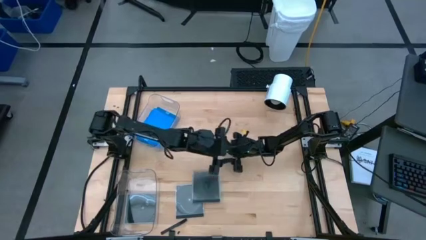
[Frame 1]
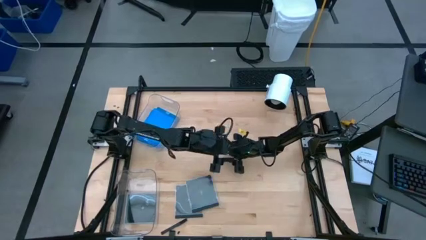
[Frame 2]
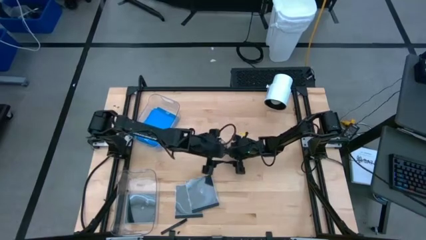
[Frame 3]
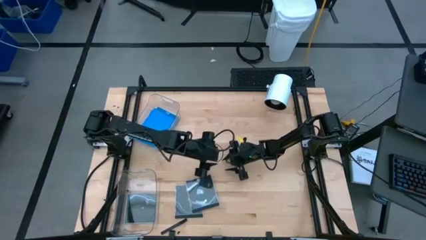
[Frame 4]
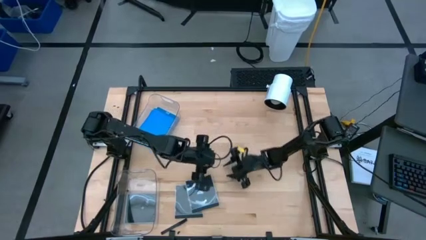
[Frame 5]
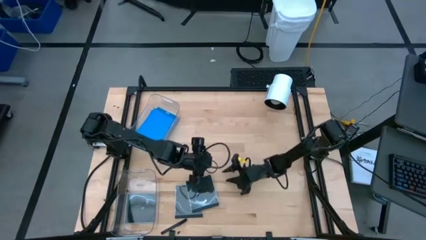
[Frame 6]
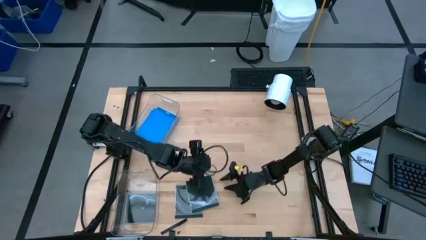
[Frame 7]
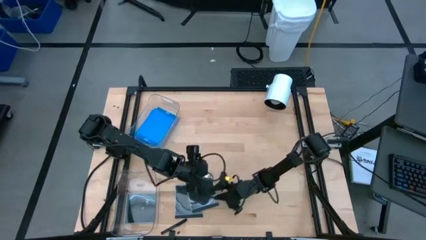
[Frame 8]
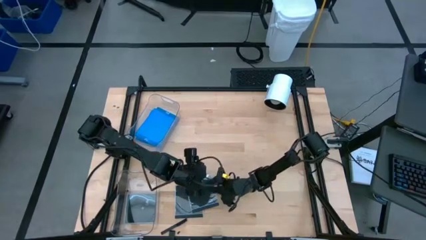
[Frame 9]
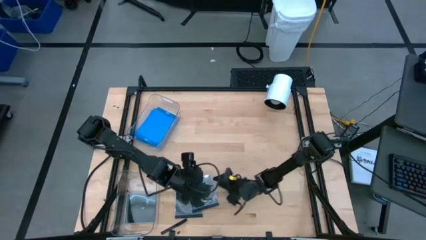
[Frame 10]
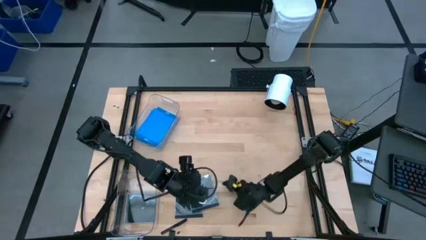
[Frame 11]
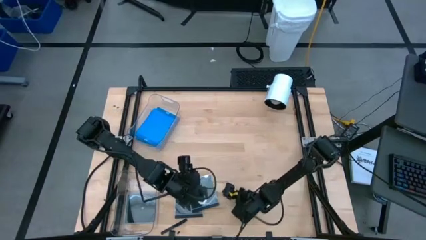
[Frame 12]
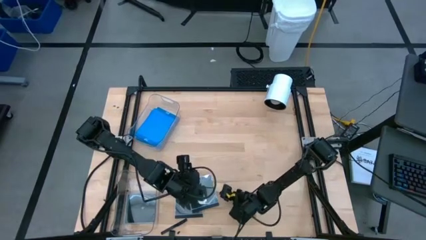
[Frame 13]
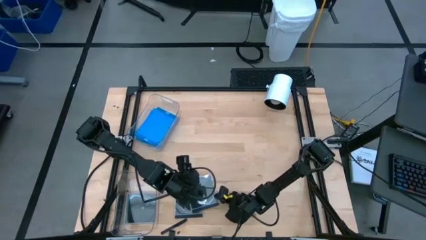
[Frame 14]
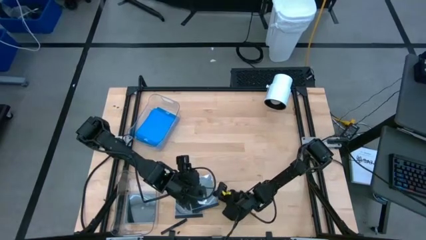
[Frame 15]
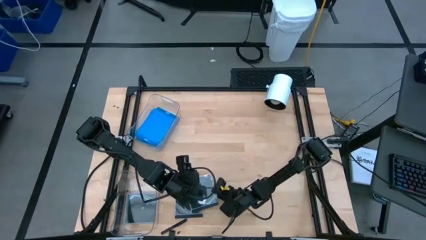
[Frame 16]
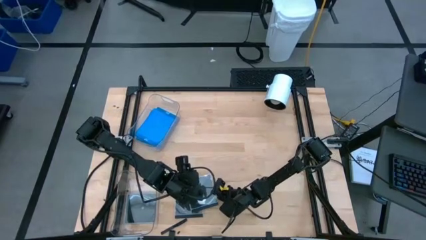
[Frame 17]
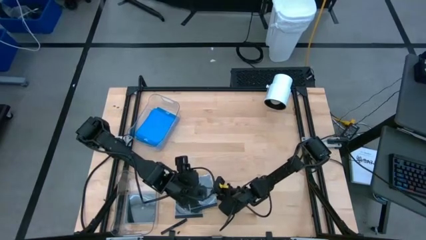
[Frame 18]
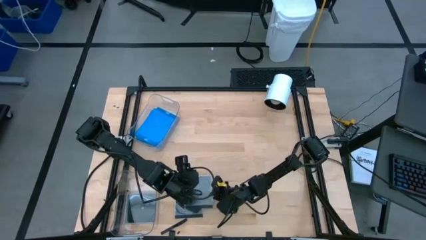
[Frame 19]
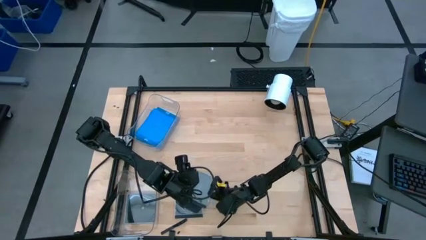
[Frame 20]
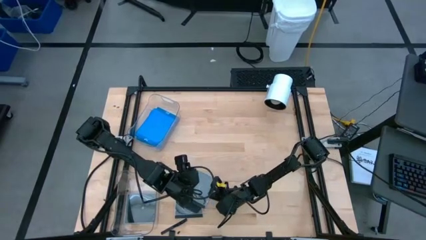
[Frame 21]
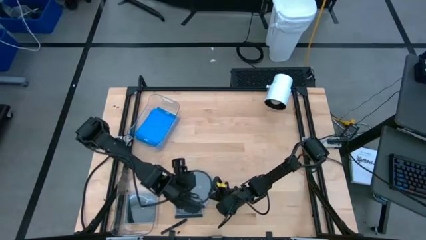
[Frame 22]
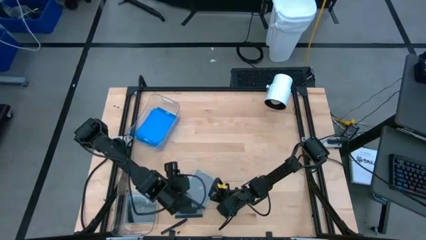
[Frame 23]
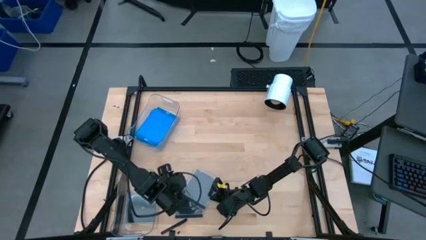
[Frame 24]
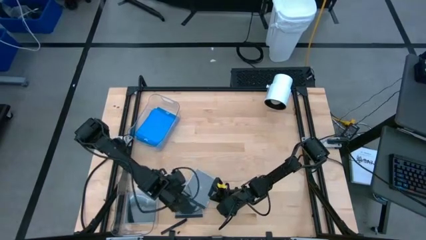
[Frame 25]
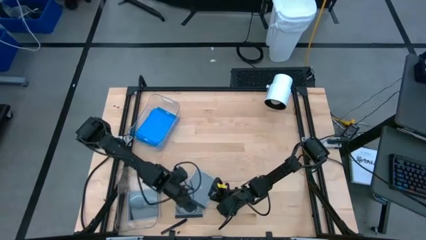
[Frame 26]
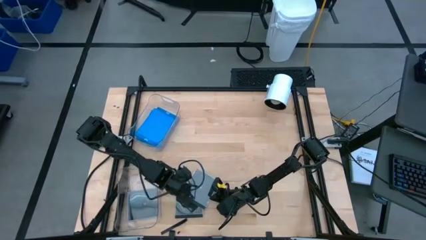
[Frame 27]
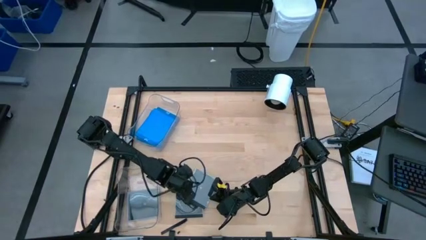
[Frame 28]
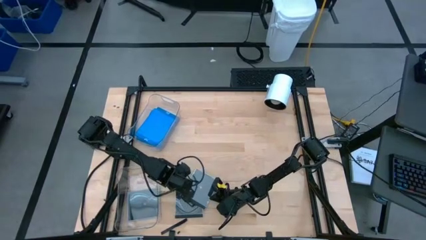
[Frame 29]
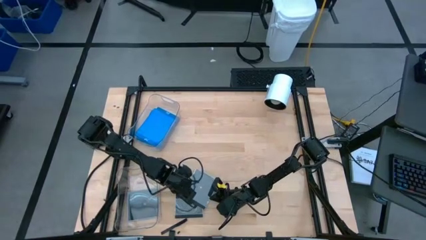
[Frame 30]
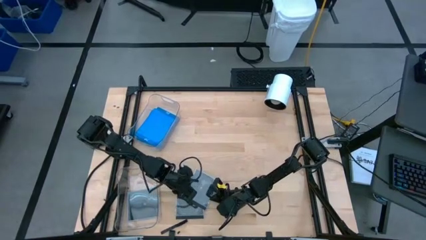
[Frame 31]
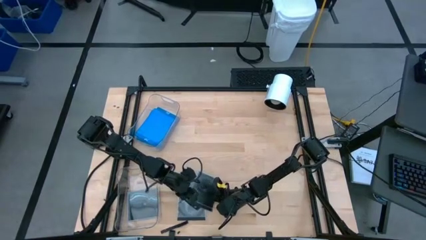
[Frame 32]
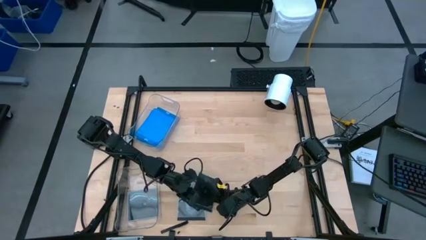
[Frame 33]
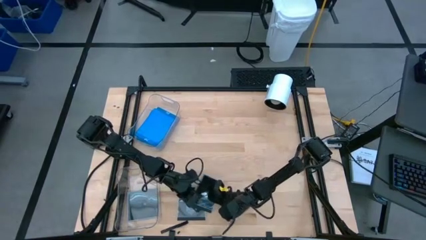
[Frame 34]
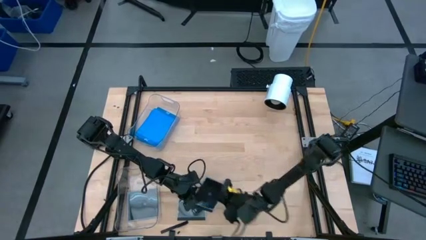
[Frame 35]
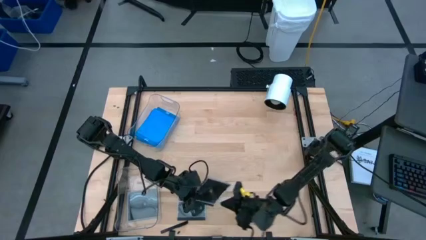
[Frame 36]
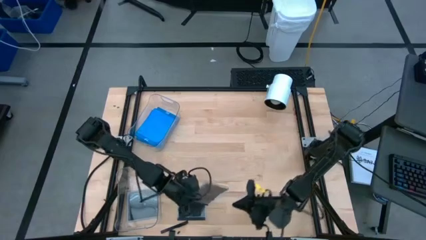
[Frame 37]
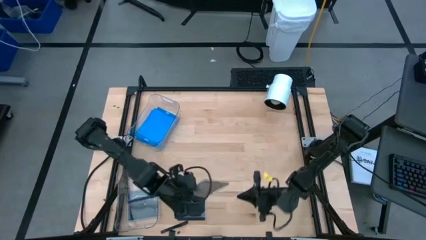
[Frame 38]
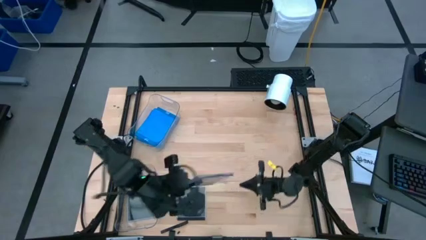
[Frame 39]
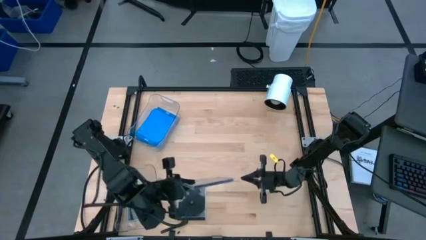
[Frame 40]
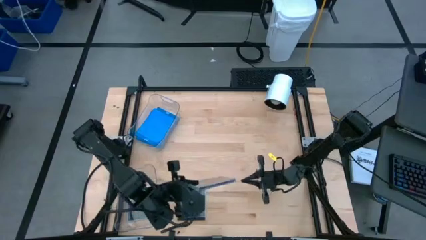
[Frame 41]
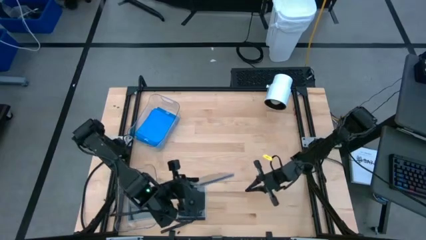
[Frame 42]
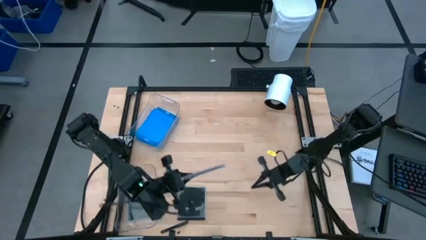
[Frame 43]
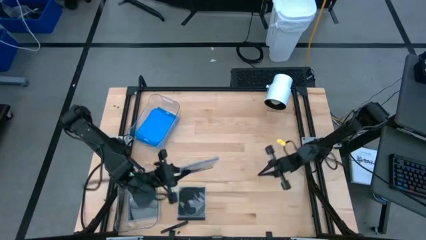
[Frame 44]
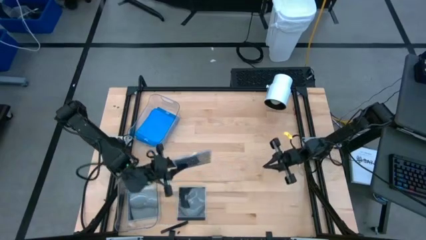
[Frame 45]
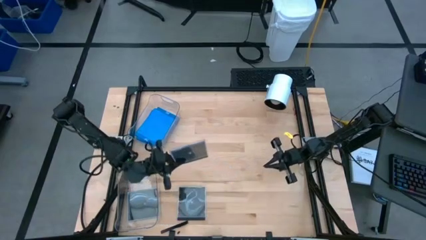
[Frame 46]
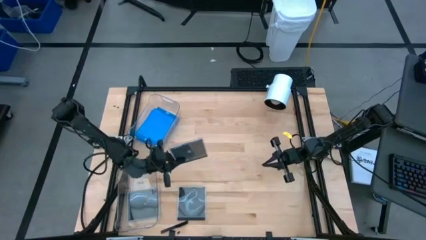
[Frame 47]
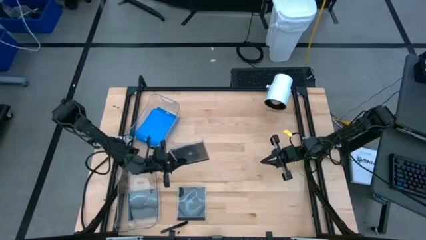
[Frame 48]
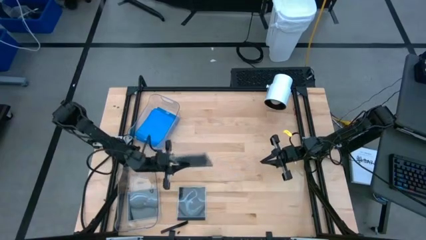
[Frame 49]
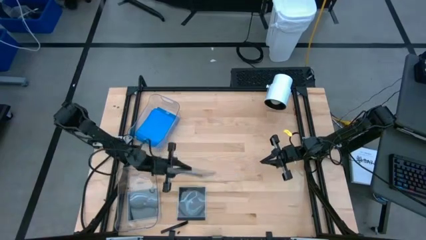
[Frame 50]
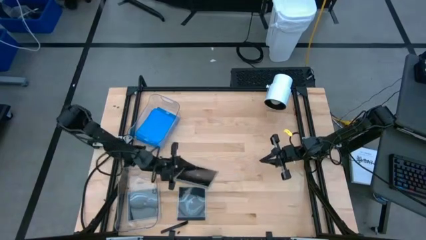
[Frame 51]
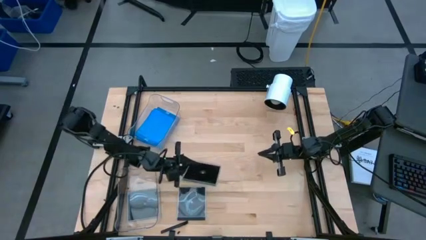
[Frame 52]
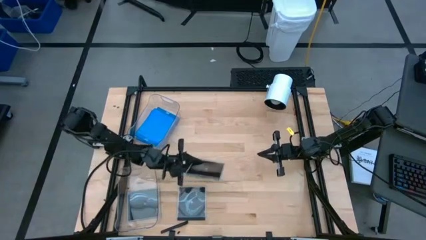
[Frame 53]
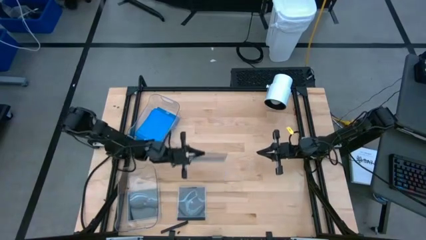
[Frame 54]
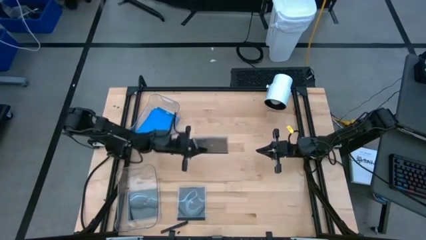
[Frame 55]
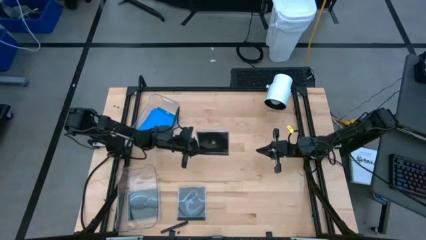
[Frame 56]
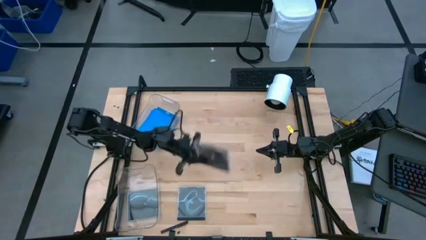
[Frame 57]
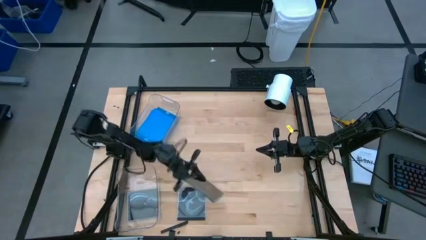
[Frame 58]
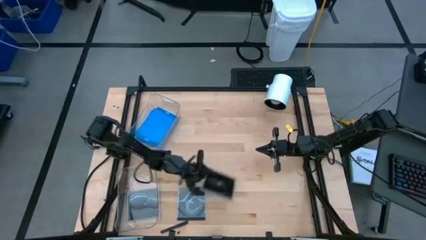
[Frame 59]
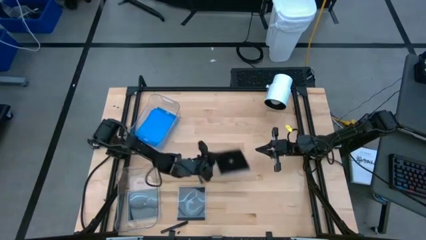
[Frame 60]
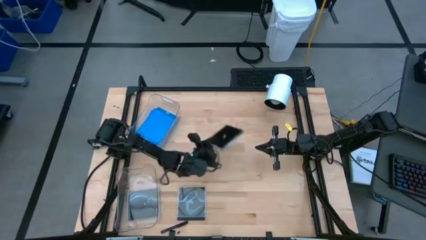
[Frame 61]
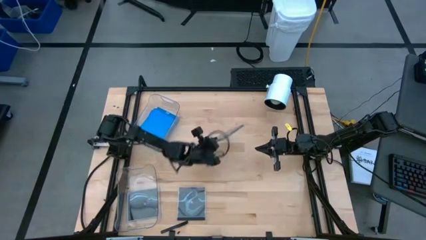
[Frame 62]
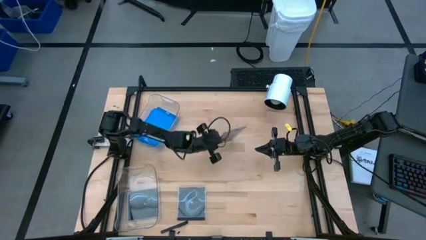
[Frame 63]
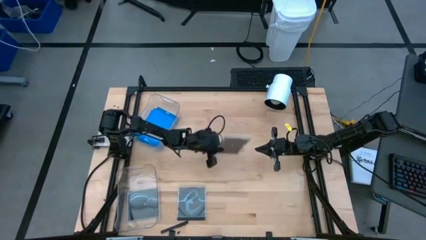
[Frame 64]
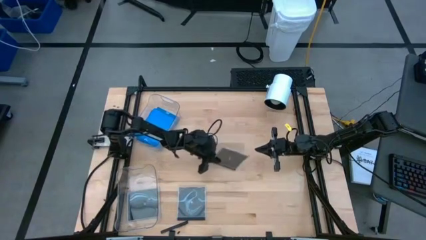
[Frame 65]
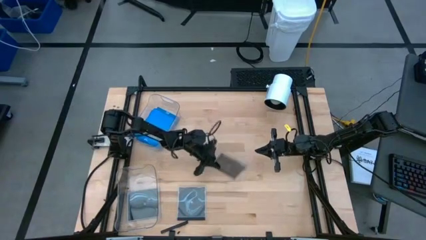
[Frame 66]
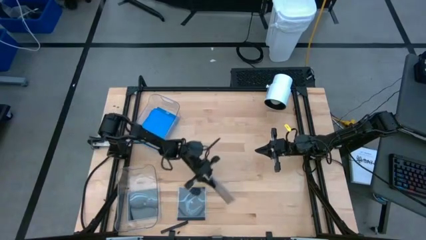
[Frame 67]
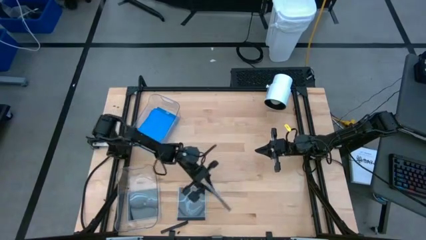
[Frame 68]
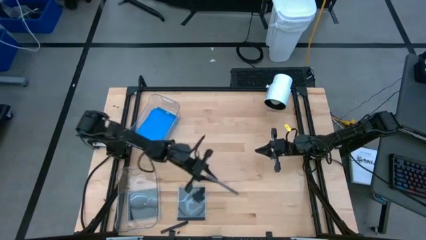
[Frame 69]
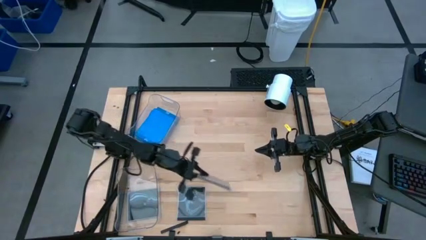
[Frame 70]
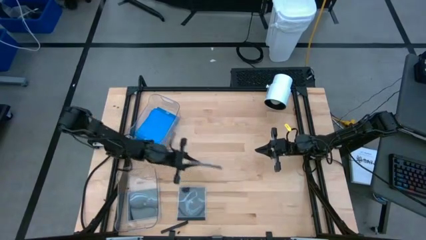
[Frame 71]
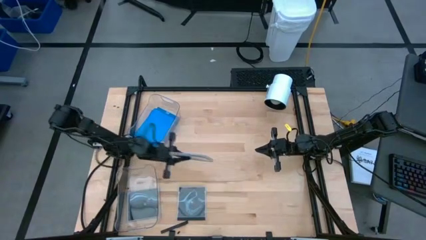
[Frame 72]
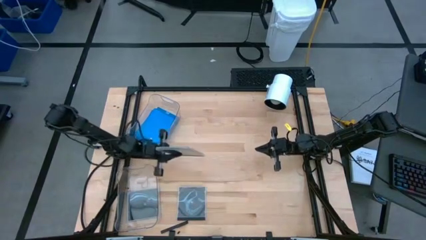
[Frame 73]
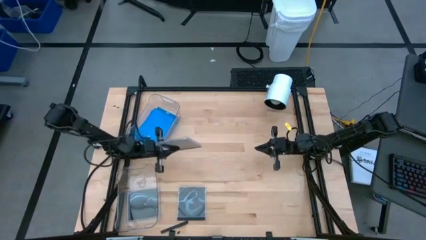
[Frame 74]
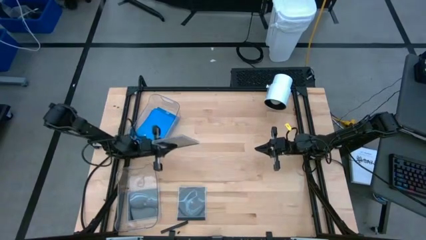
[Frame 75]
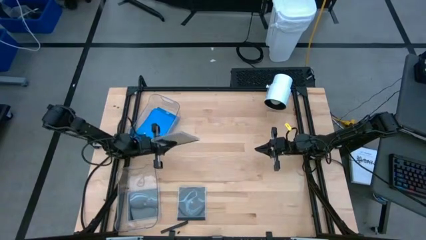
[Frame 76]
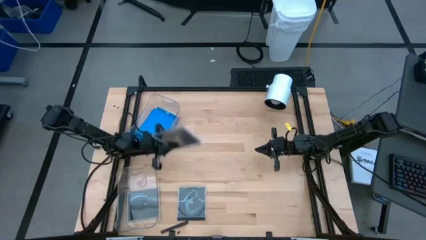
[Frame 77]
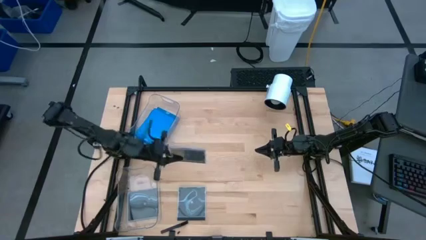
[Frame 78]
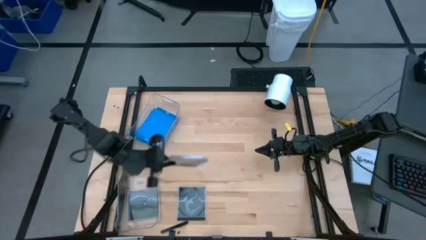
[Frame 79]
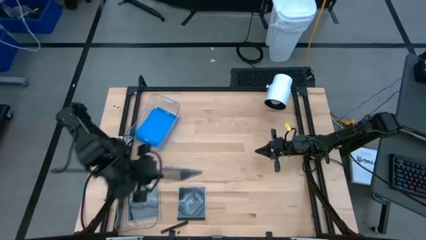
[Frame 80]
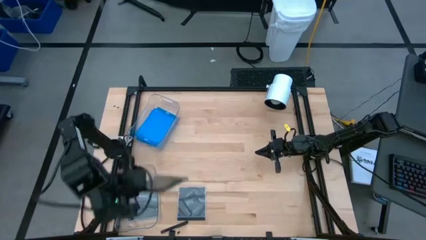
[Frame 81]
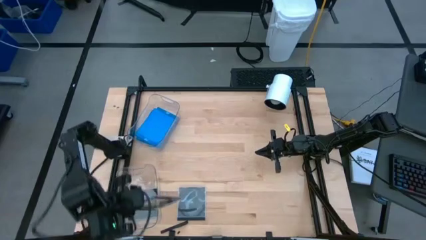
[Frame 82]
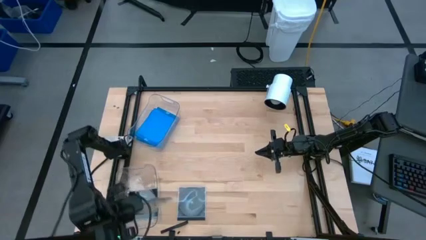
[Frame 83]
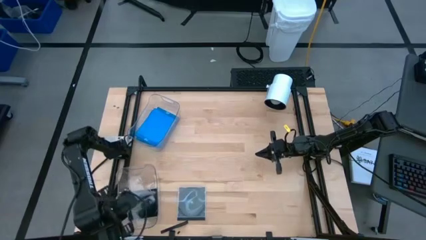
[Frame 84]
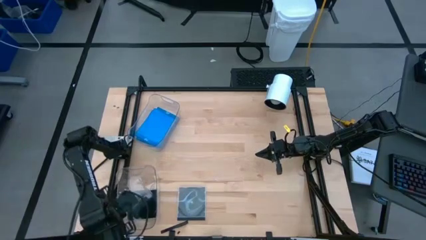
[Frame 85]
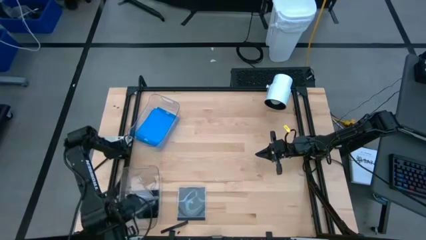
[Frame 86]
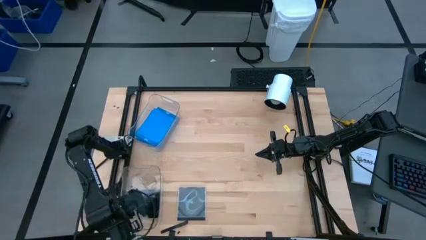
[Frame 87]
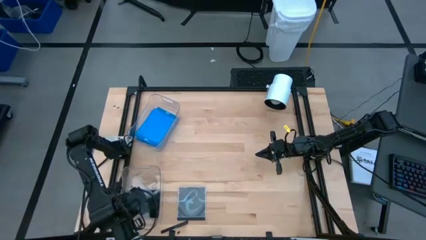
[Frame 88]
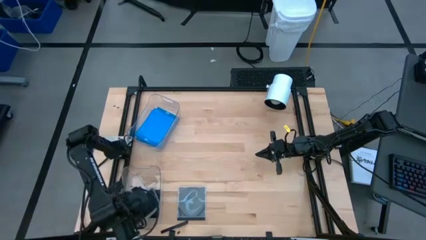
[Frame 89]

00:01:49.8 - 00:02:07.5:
Task: Pick & place jewel cases by type
Put the top black CD case into the bottom transparent bin
